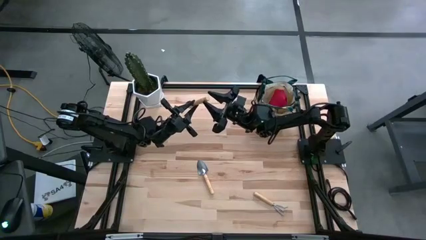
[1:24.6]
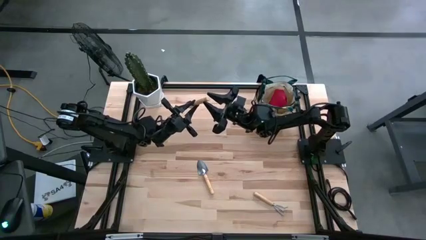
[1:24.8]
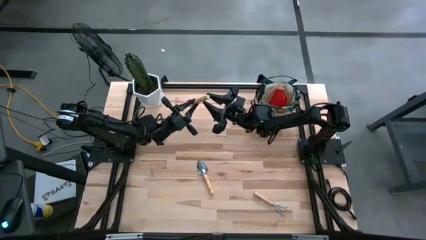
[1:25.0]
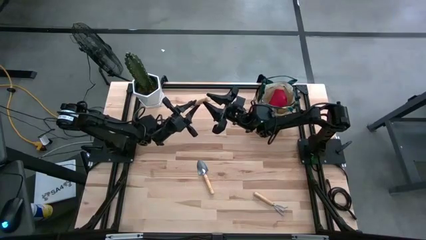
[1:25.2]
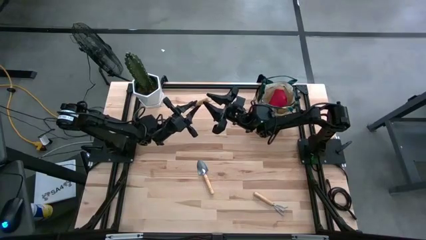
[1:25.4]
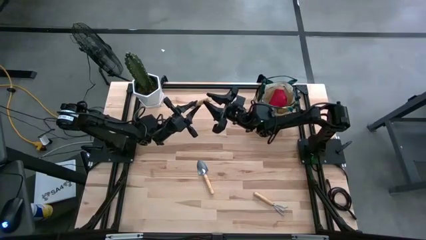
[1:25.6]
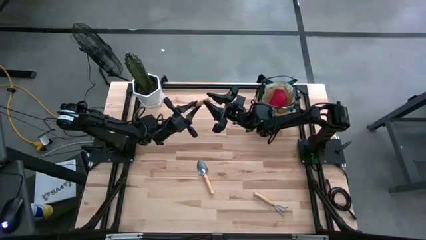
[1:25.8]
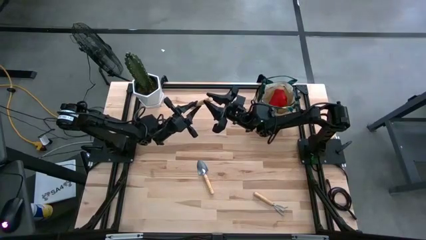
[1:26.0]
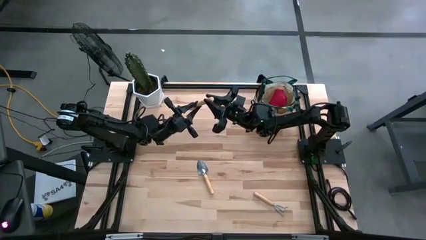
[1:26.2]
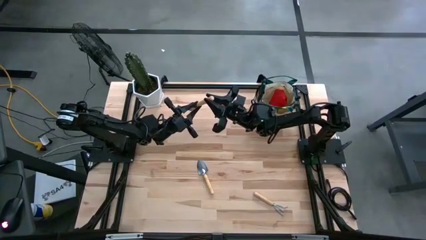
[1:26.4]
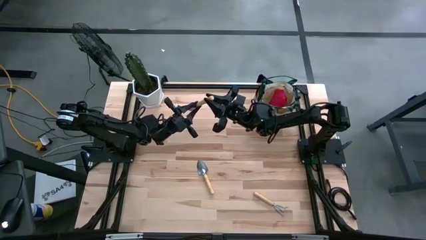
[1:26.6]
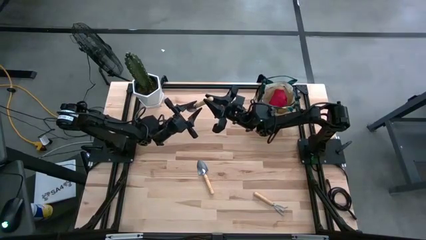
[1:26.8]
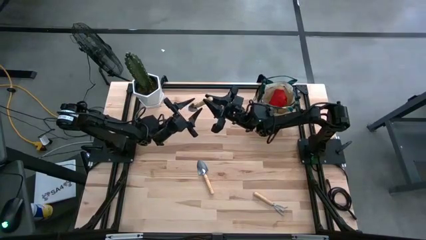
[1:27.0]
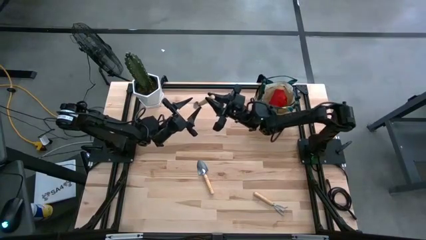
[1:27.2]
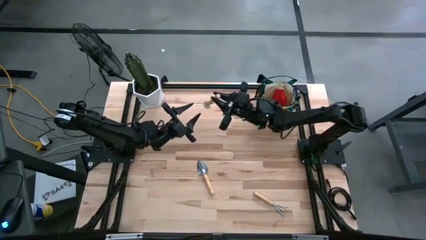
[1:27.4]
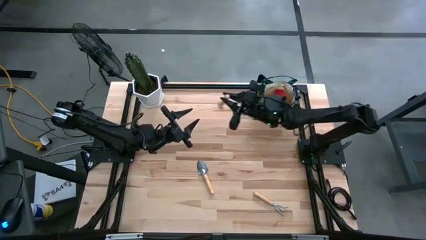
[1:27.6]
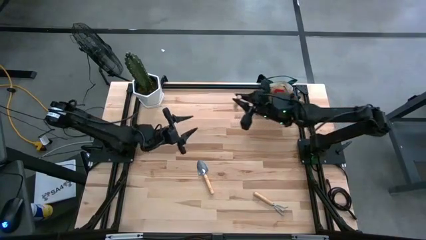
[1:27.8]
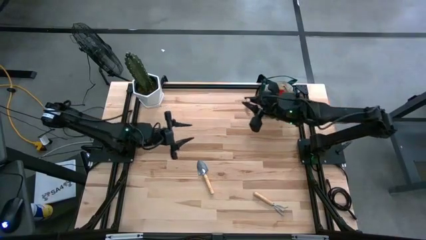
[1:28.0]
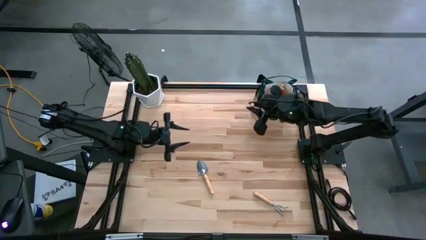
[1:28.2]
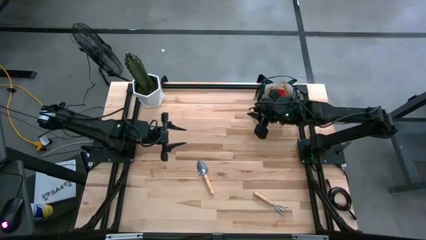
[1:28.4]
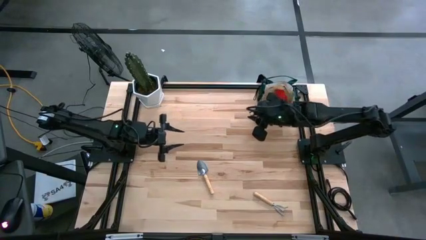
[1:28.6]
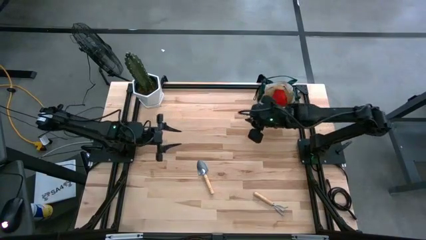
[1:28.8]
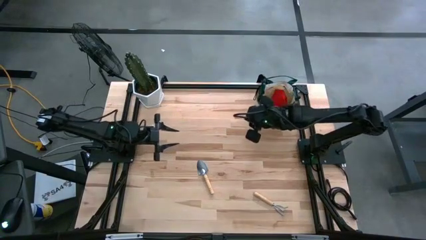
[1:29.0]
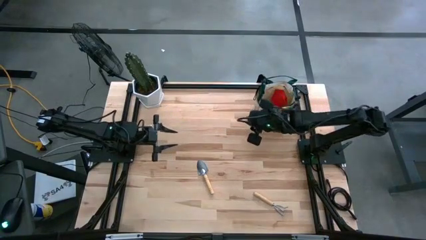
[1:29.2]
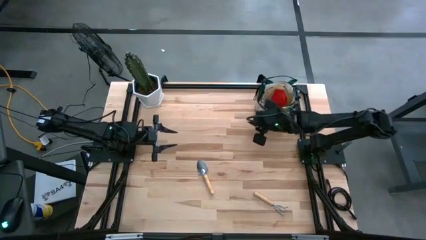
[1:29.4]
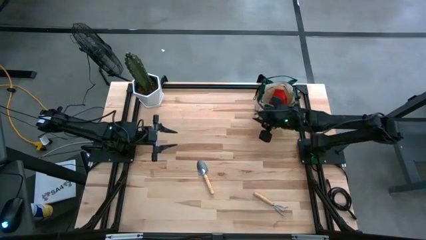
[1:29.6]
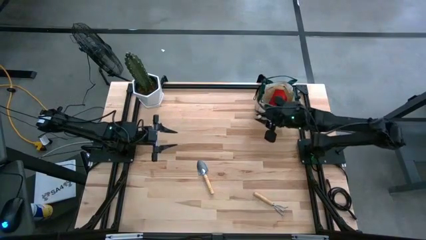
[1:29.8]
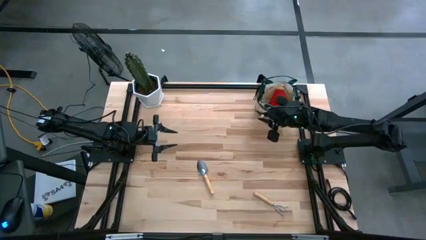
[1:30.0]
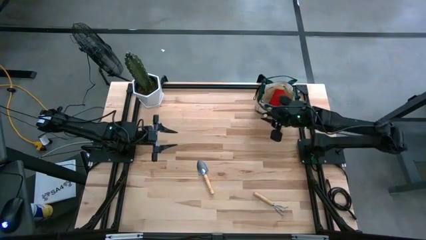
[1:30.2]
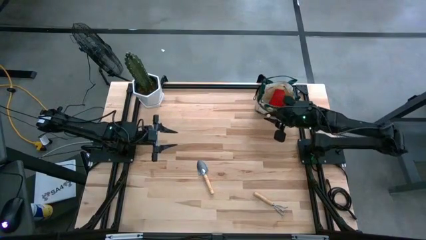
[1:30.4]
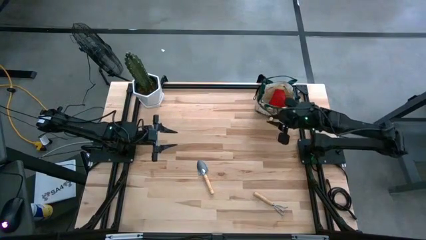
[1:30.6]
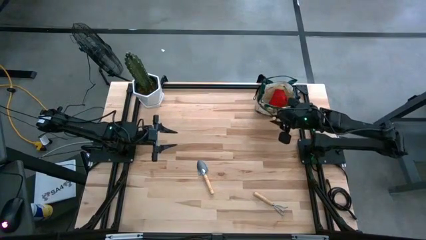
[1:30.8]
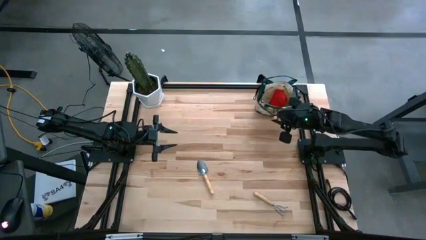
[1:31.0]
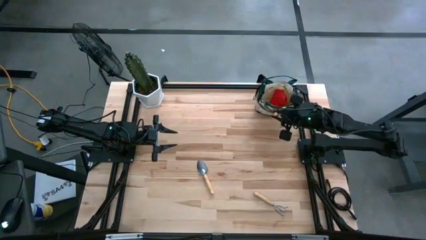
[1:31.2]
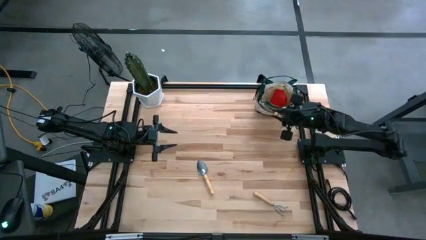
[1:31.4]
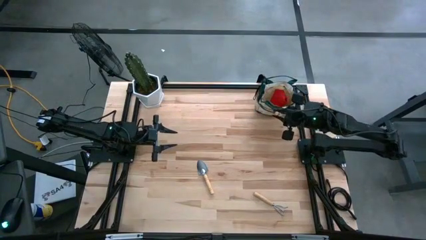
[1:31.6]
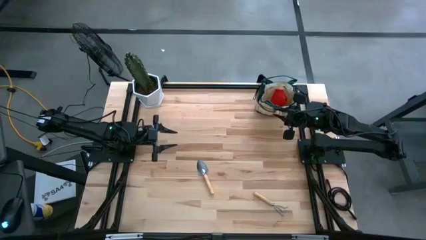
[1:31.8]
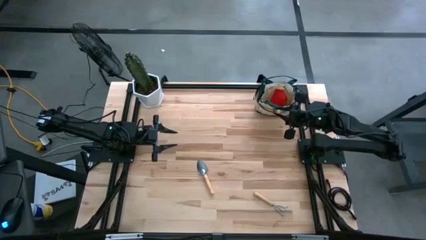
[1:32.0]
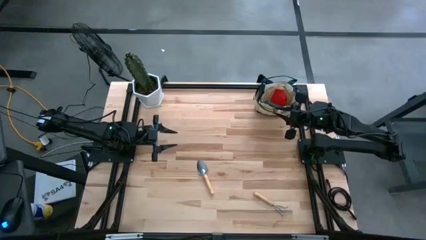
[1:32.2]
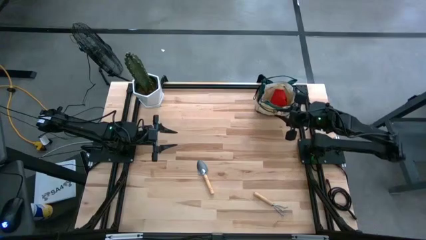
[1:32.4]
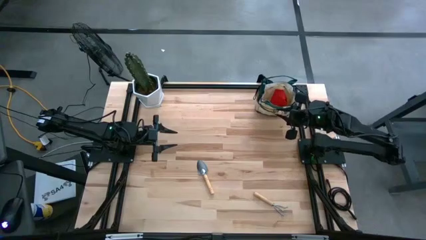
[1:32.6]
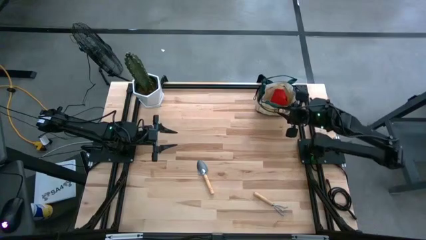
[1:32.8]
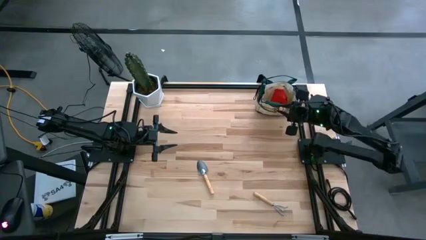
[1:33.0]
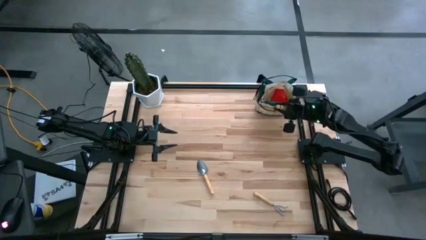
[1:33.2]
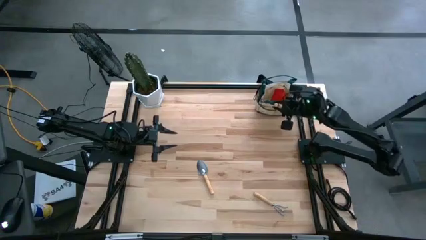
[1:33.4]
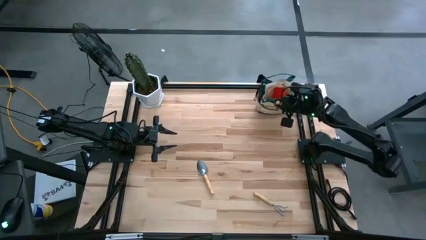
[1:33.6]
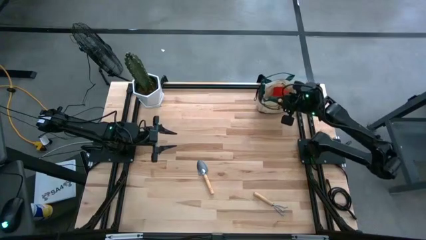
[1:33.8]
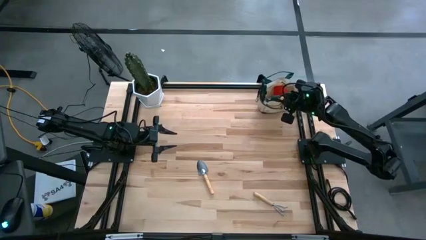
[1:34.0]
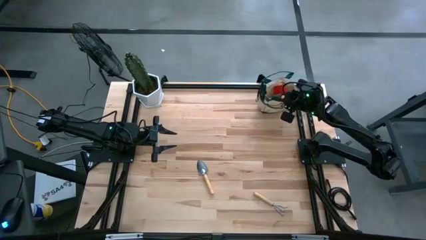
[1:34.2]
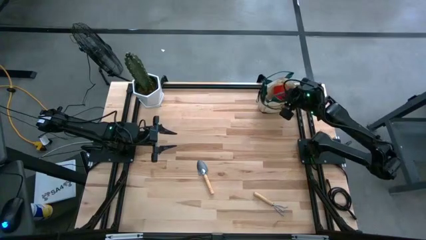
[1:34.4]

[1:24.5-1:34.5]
Task: Pick & Place Garden tools in Gardening bag
Put the left brown trowel into the gardening bag

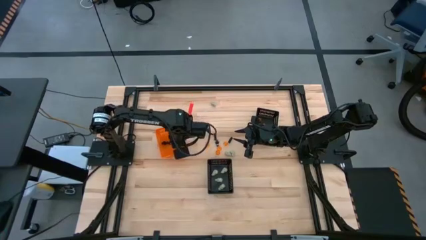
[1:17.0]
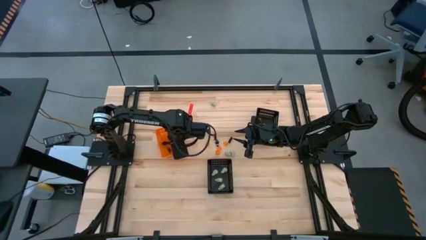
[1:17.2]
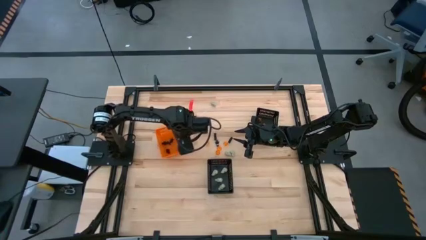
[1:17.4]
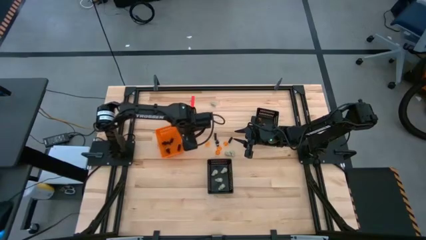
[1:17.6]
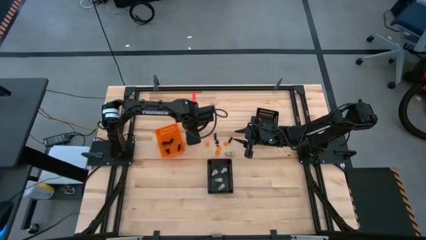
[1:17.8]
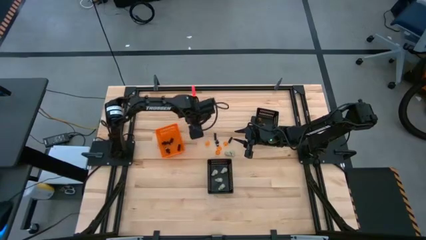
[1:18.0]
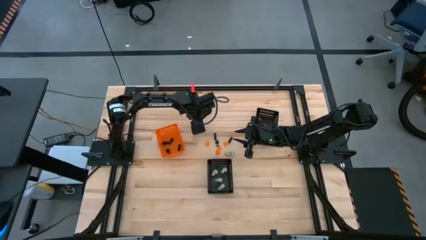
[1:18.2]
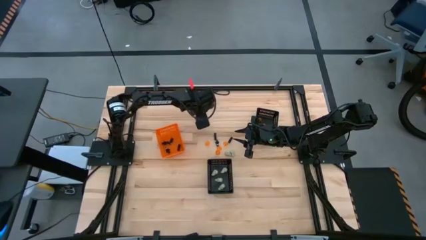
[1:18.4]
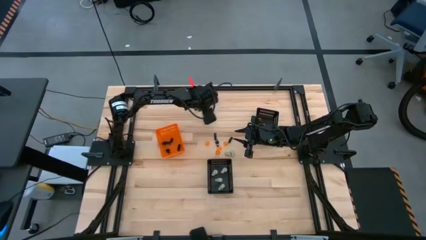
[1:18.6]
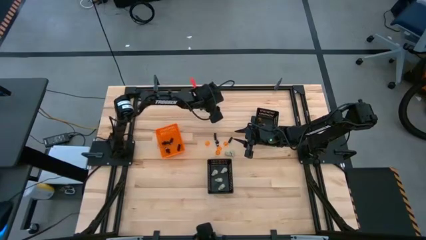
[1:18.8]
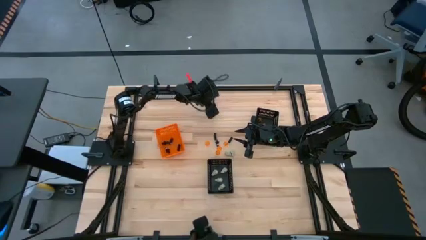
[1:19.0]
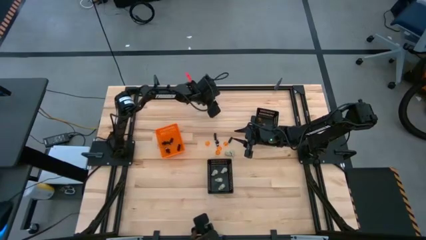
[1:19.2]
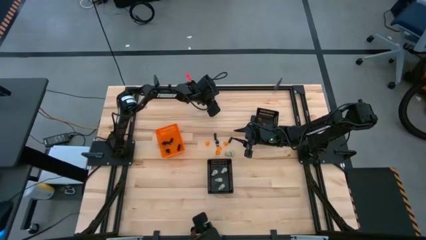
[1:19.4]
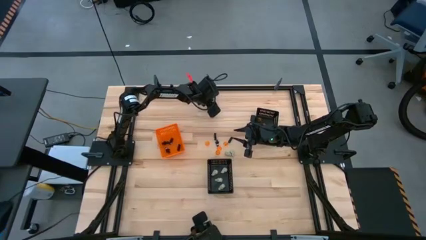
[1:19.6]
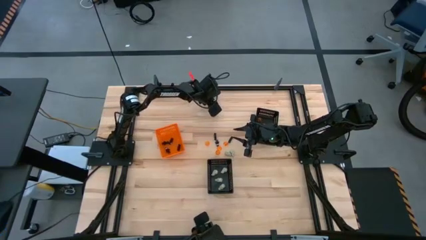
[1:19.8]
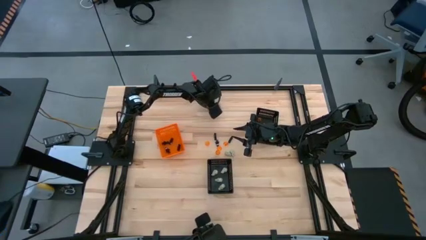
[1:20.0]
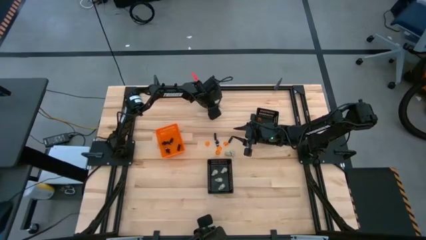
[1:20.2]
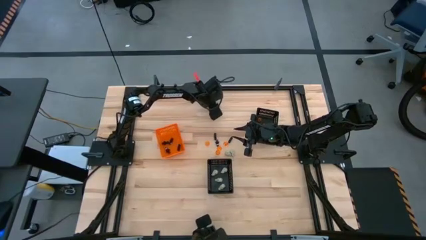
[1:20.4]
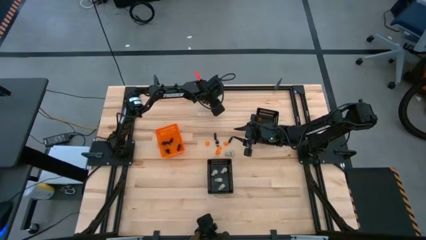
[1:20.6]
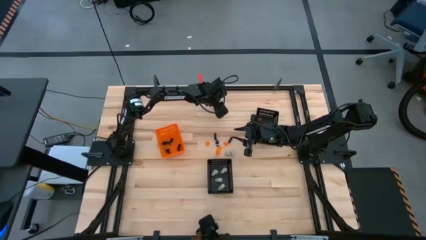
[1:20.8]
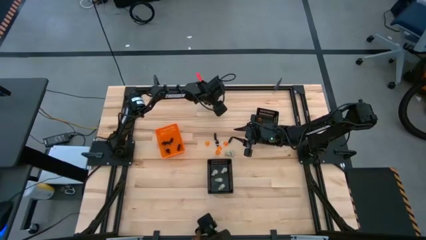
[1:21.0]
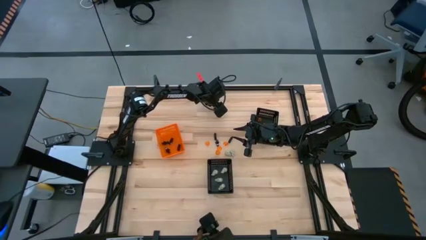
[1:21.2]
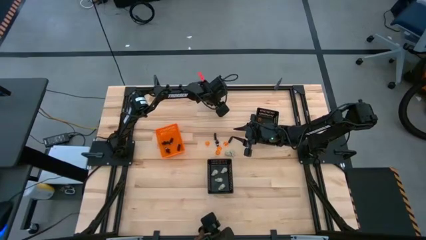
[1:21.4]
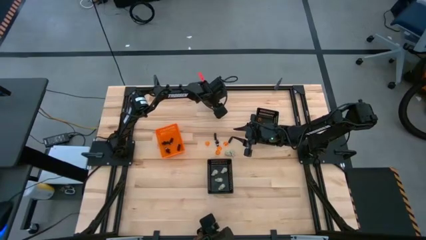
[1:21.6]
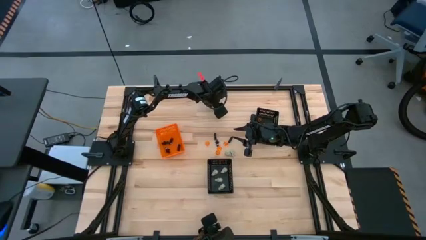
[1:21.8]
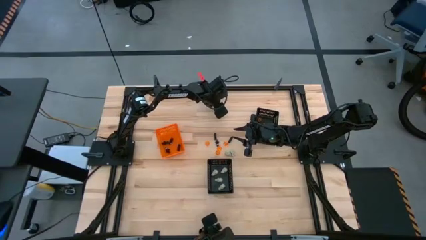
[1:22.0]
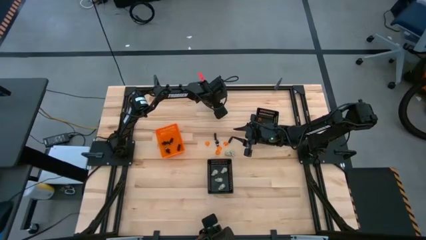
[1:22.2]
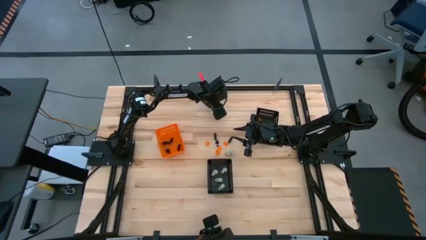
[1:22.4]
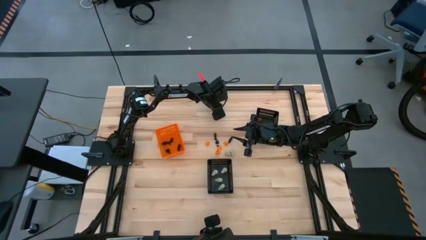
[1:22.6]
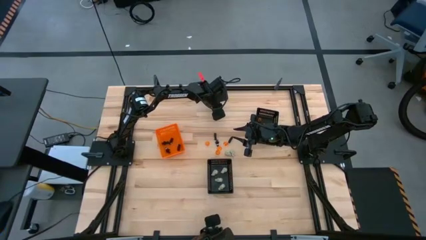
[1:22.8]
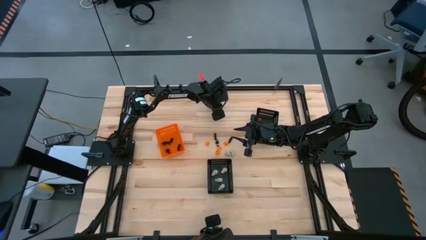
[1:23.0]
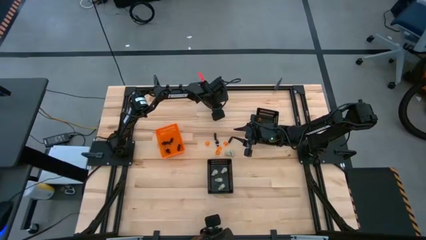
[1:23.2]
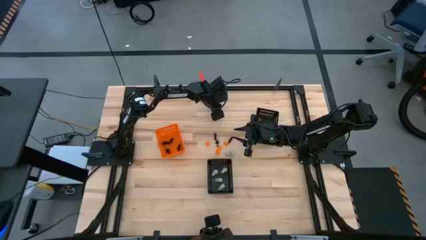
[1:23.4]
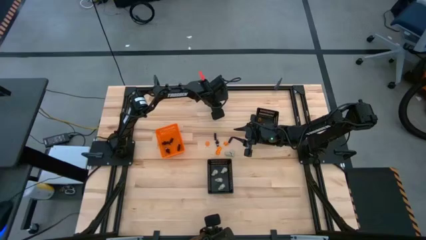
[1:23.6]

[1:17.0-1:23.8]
Task: Sort Halloween decoration
Put the white skull toy into the bottom black bin
